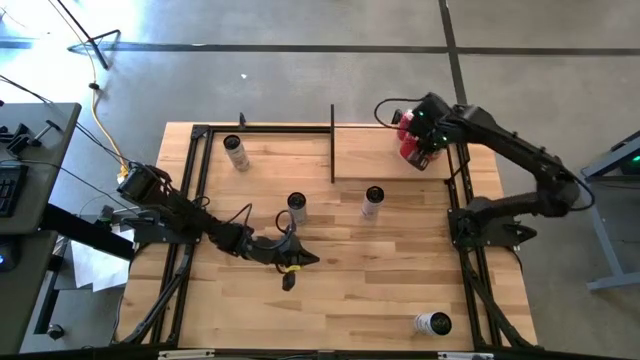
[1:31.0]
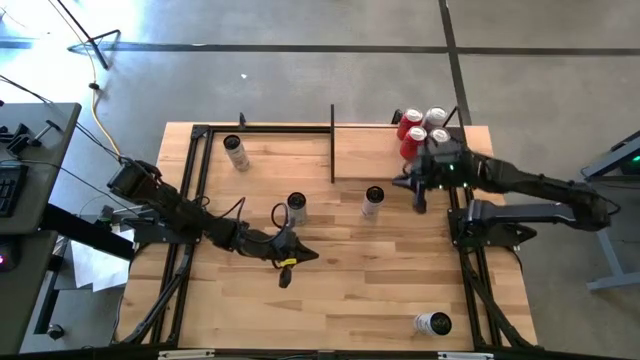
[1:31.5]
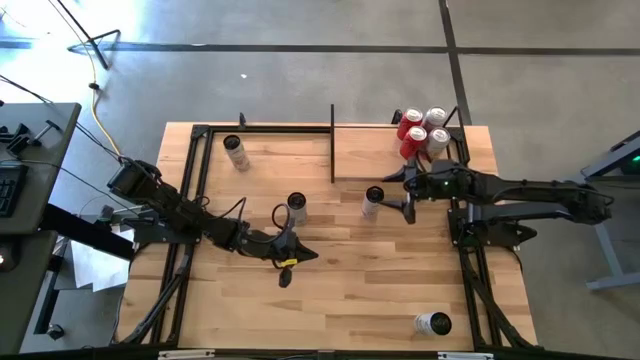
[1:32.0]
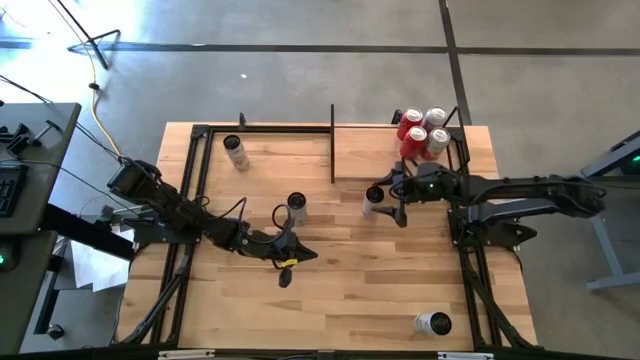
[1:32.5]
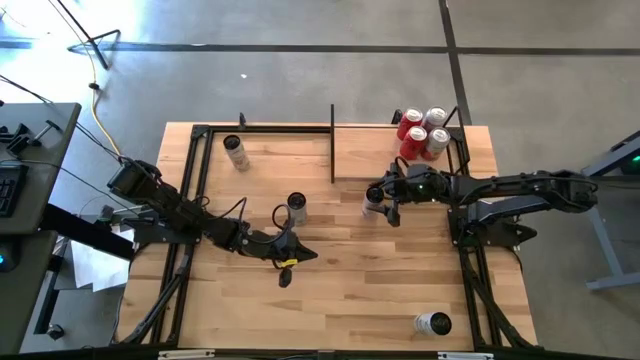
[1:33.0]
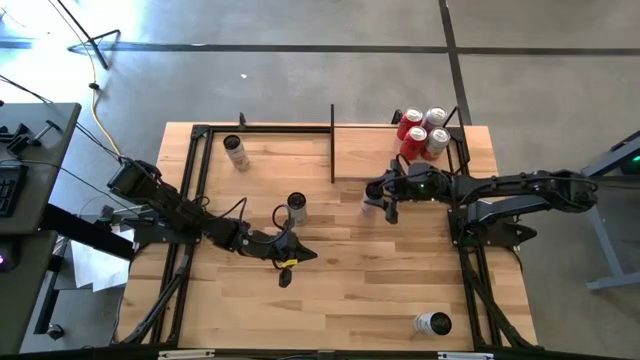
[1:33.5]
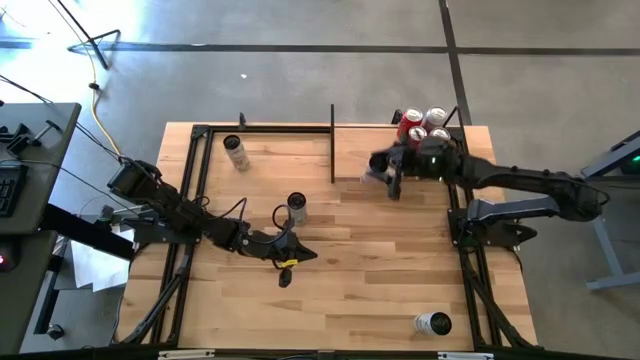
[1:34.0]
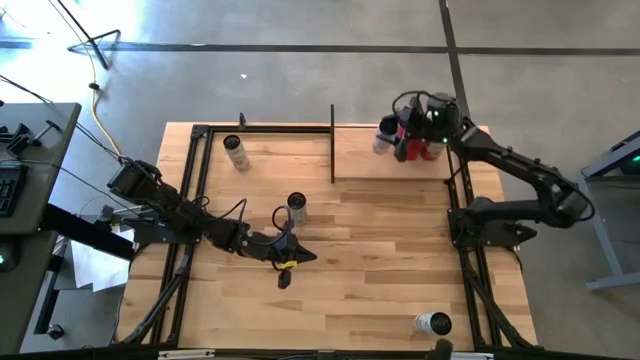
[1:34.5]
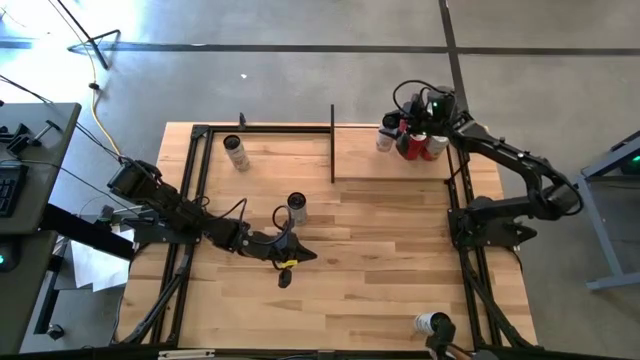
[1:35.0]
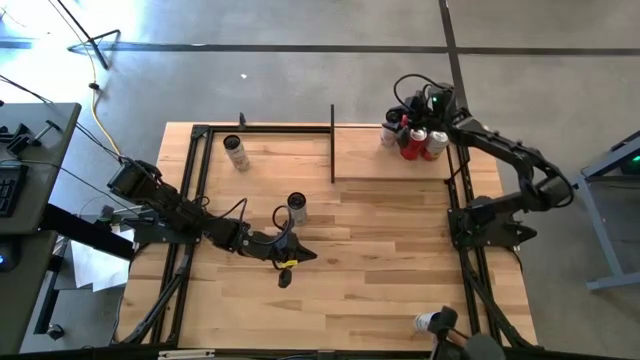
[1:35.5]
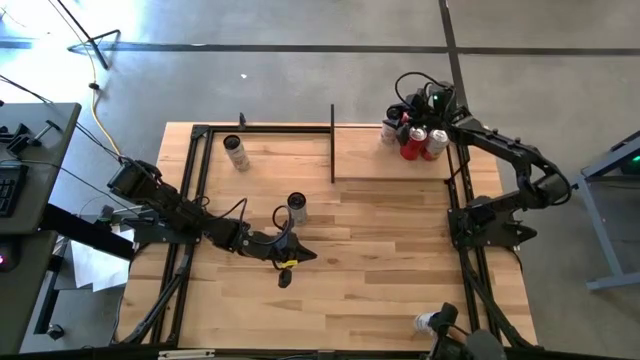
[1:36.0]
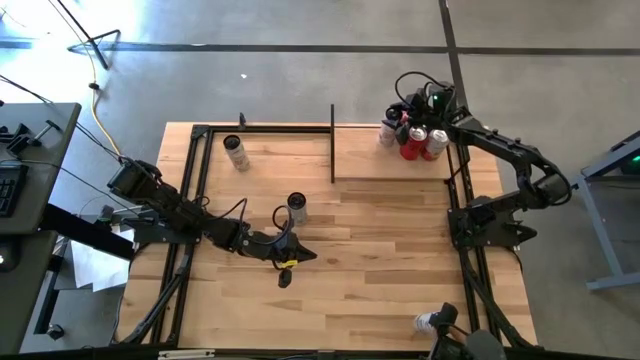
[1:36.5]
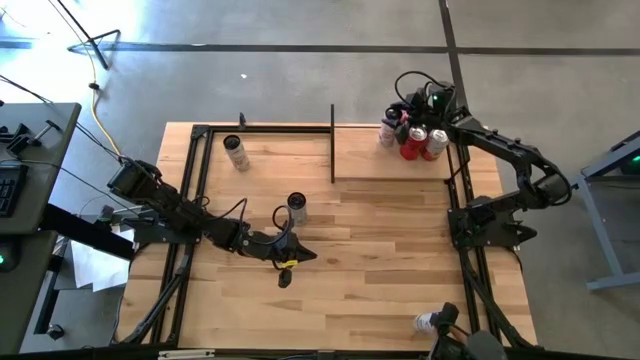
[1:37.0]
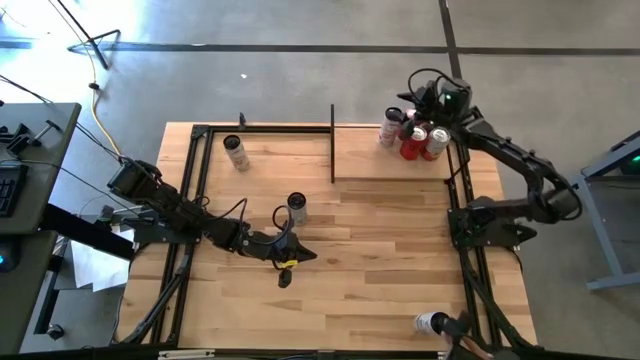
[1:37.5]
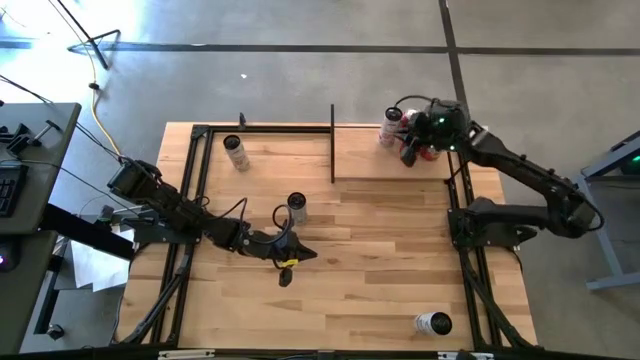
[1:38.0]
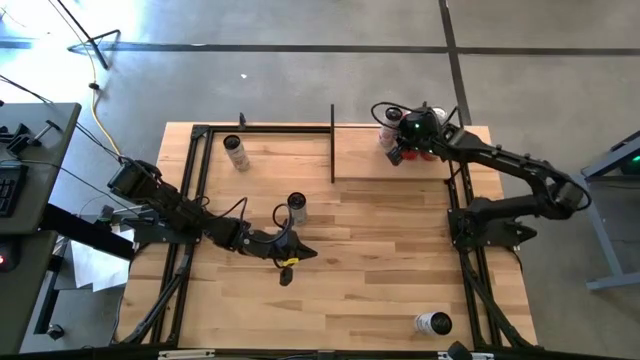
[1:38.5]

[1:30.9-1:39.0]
Task: Place canned beverage on shelf
Put the bottom peach vibe soda can on the shelf

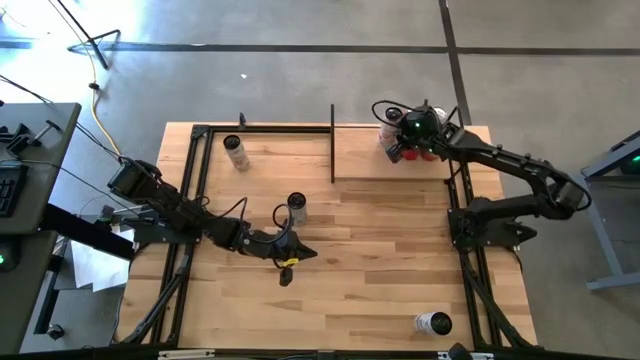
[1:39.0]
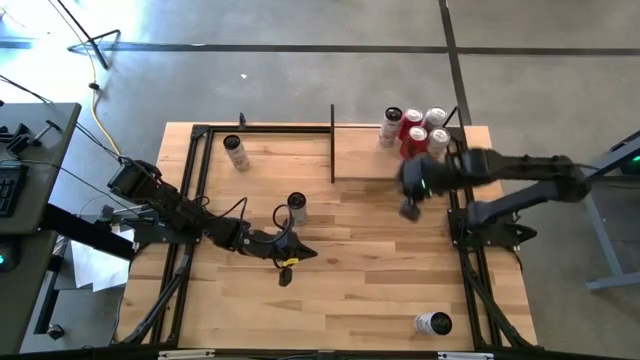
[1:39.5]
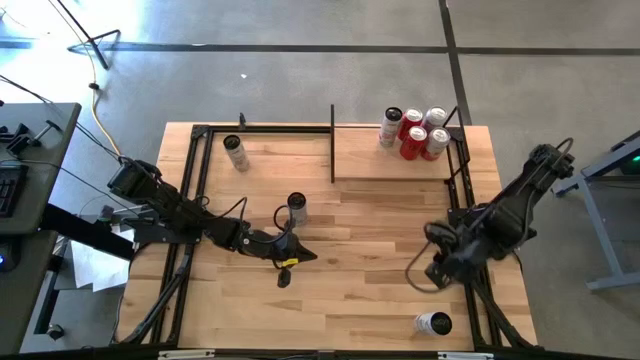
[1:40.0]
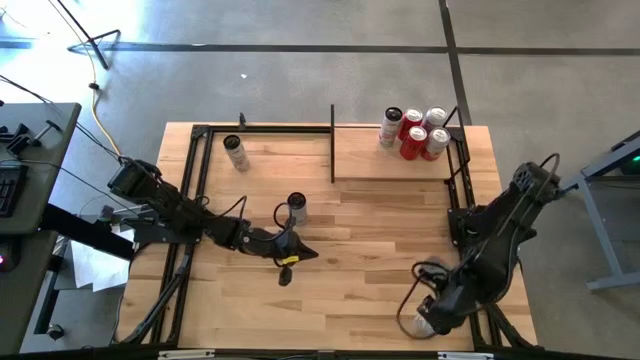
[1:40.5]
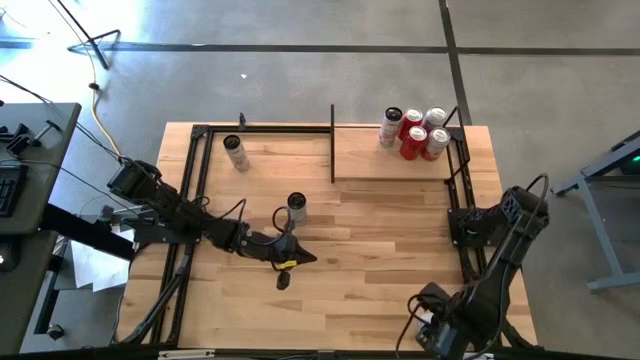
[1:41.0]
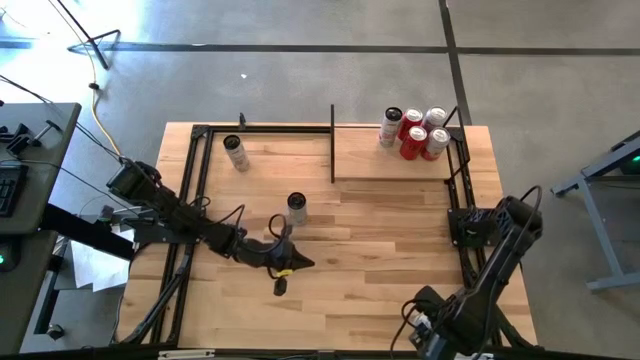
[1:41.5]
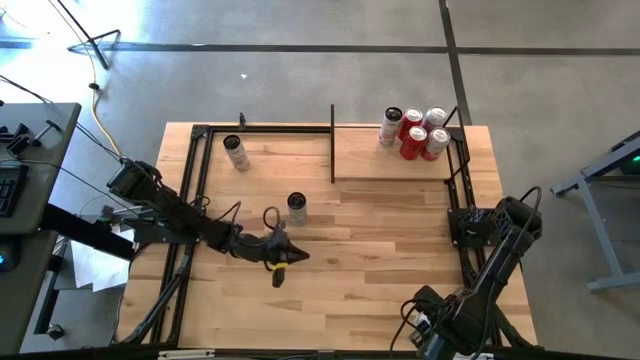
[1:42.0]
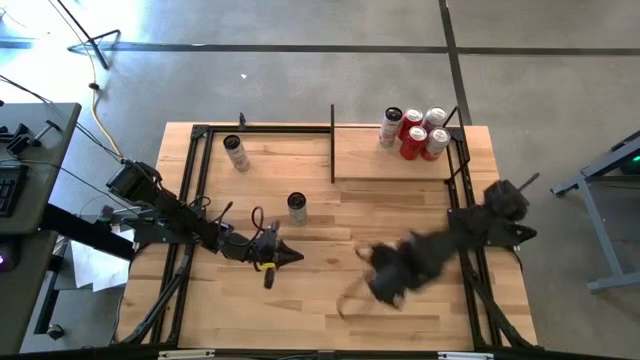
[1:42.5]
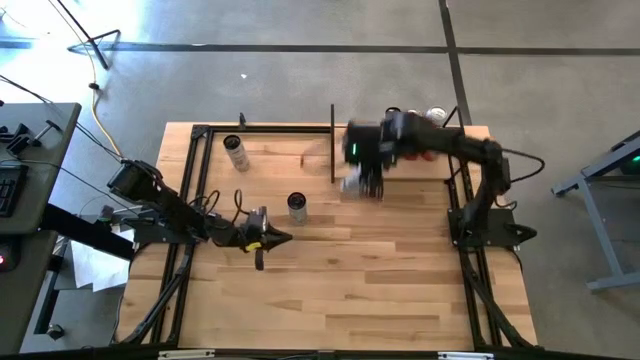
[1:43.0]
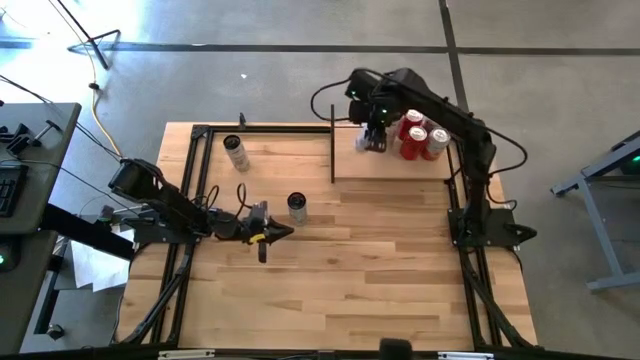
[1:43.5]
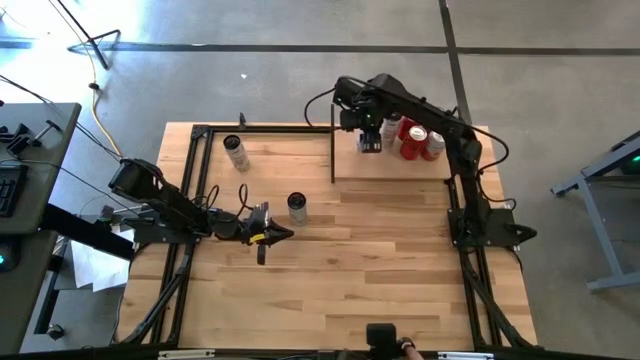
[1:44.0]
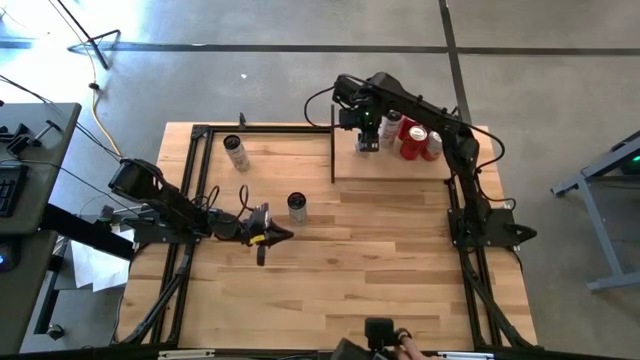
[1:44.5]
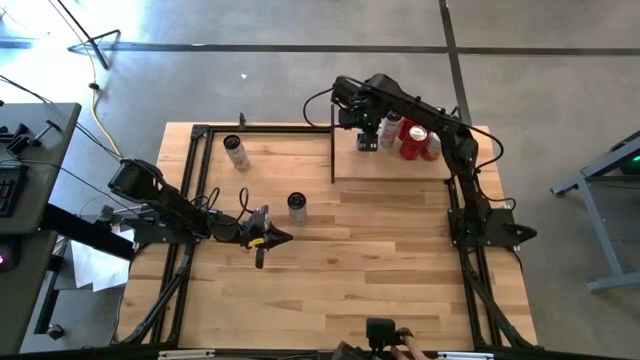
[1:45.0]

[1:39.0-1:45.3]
Put the bottom arctic vibe soda can on the shelf

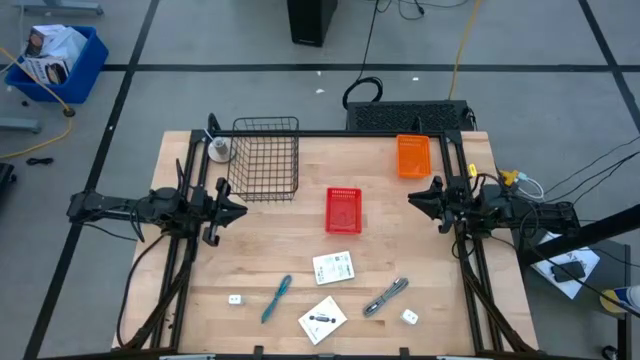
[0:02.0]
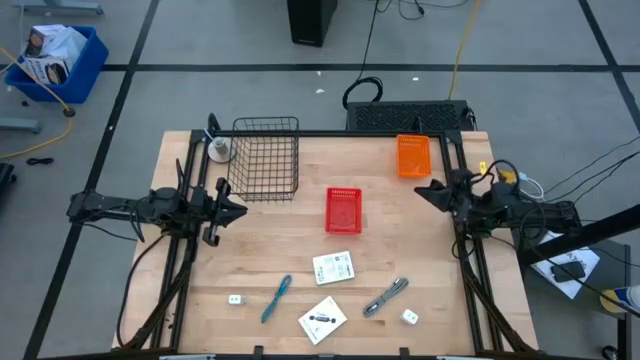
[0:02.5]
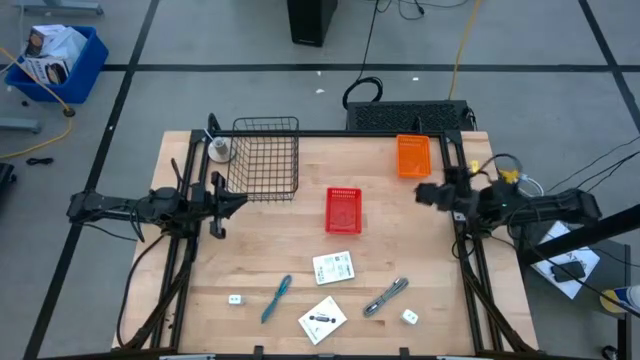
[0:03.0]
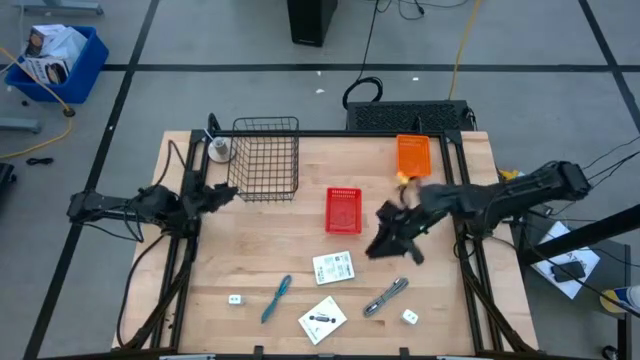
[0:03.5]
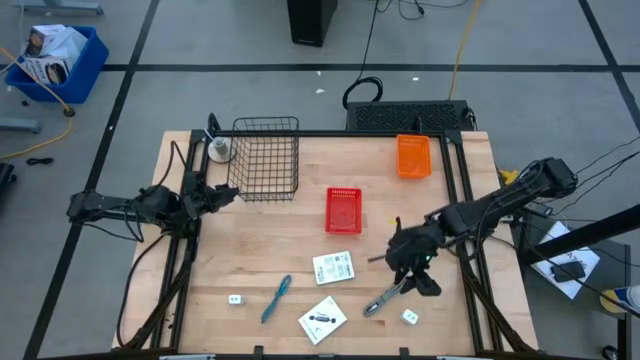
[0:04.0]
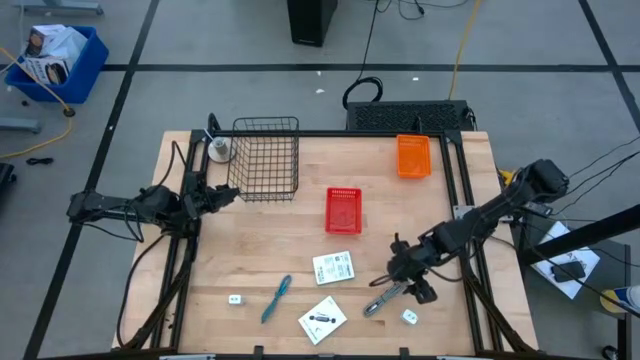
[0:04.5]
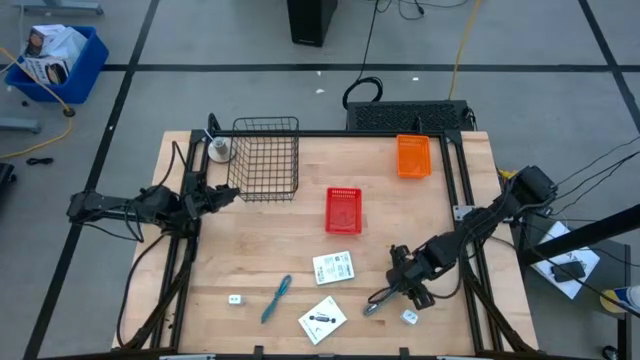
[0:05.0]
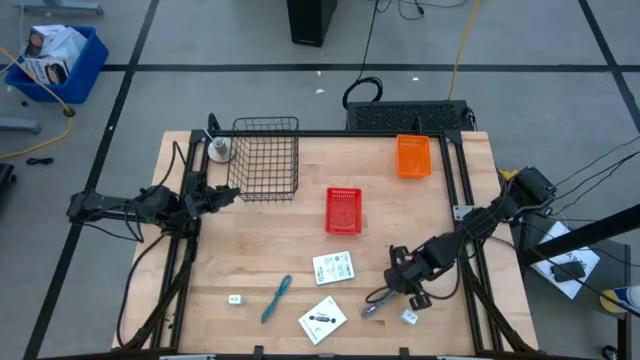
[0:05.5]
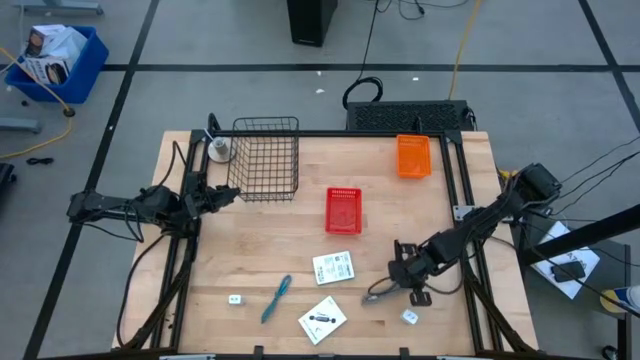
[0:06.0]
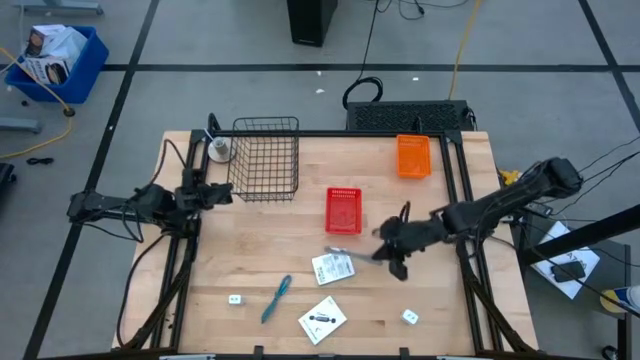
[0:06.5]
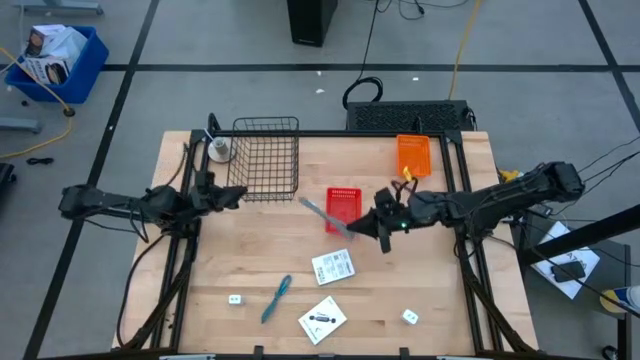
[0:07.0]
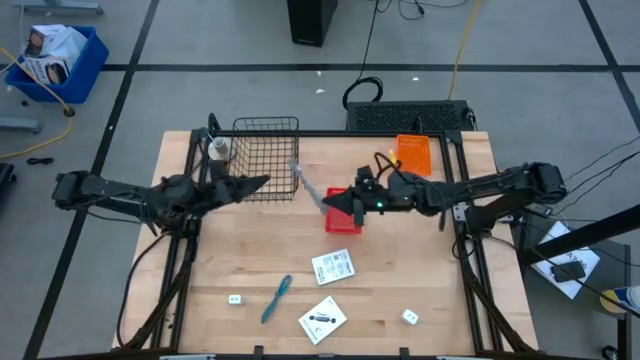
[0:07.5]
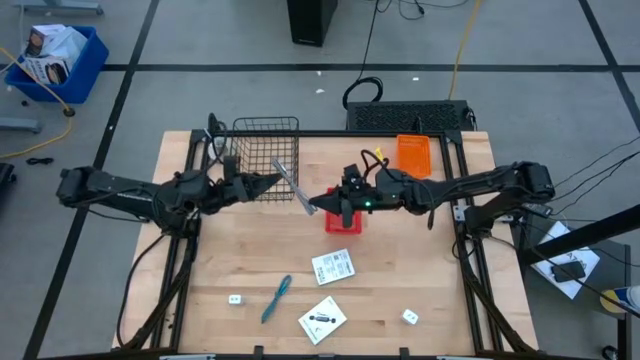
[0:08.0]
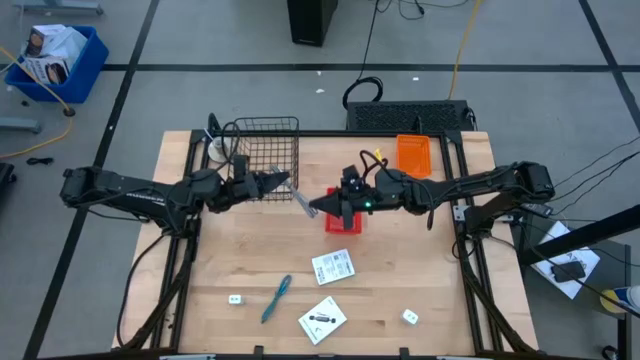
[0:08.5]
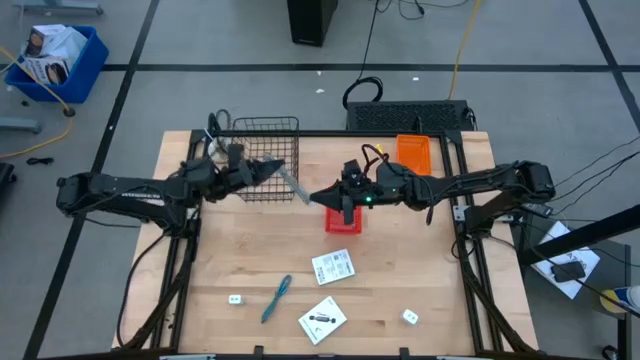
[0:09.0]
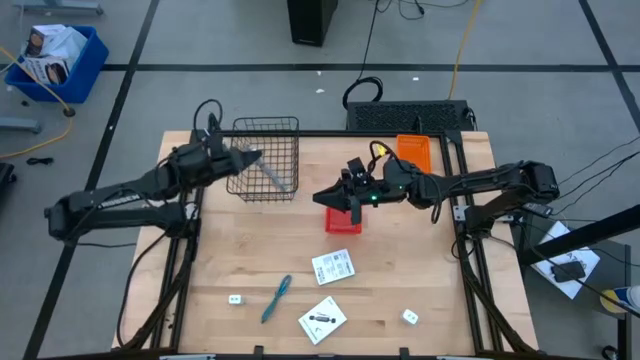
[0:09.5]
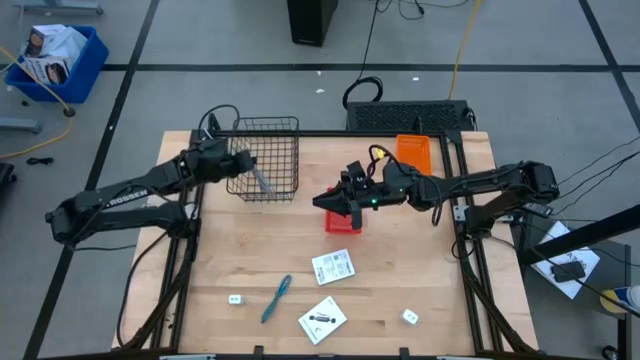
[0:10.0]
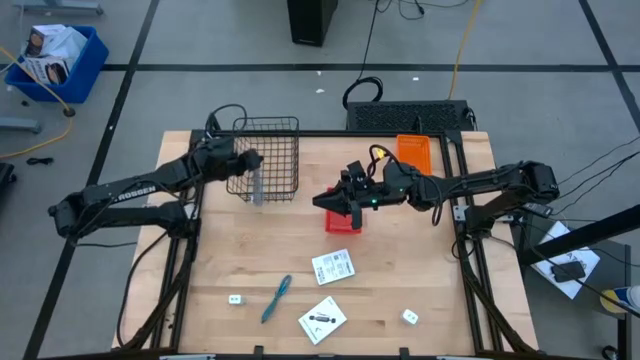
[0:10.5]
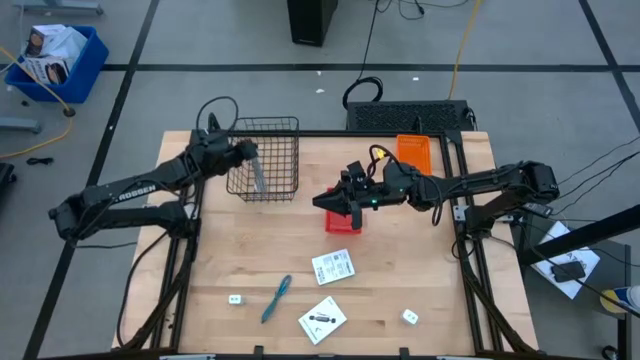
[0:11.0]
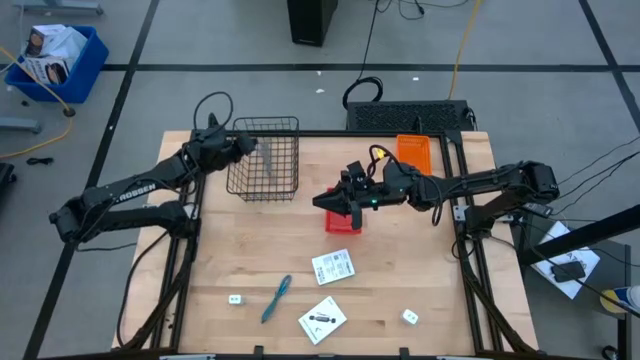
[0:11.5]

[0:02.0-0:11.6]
Task: Pick and place items into bin
Put the gray charger cable into the wire basket
